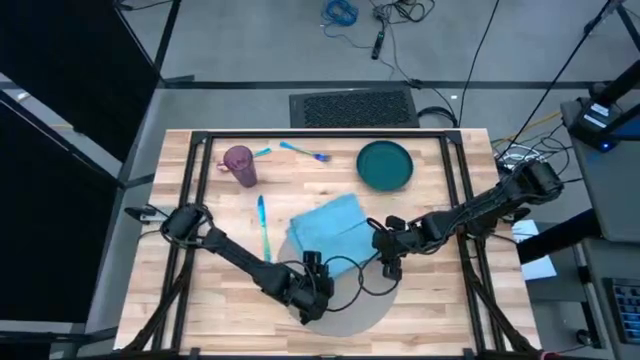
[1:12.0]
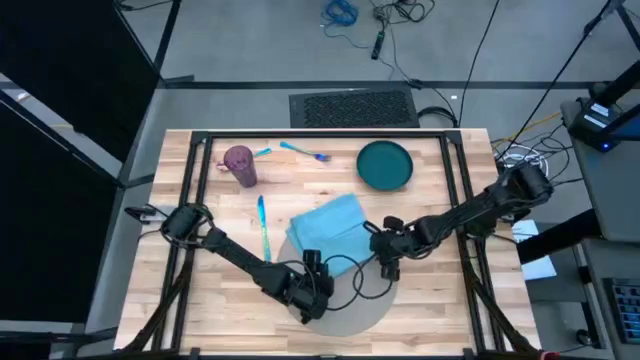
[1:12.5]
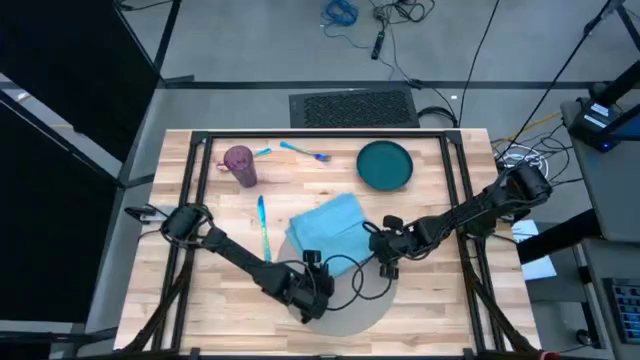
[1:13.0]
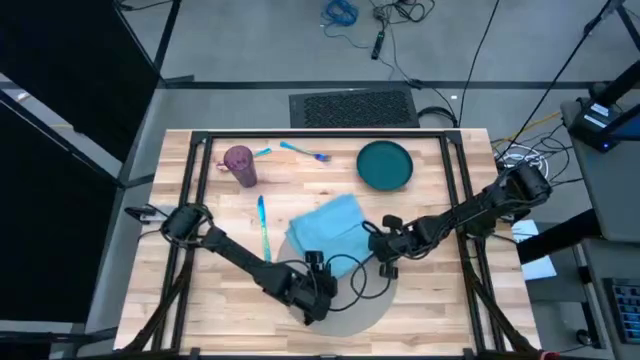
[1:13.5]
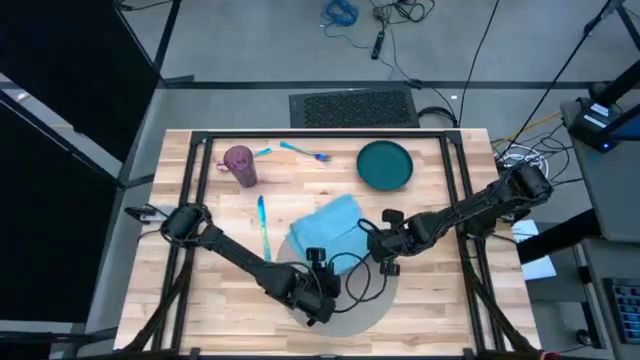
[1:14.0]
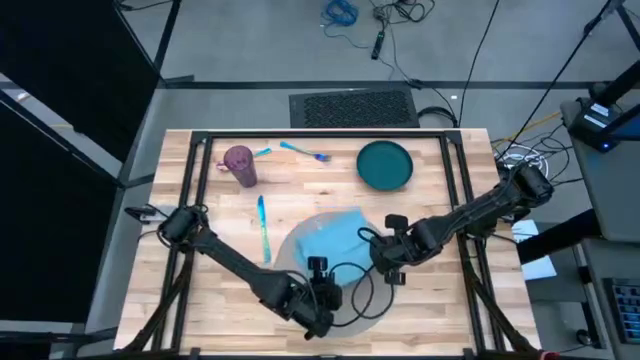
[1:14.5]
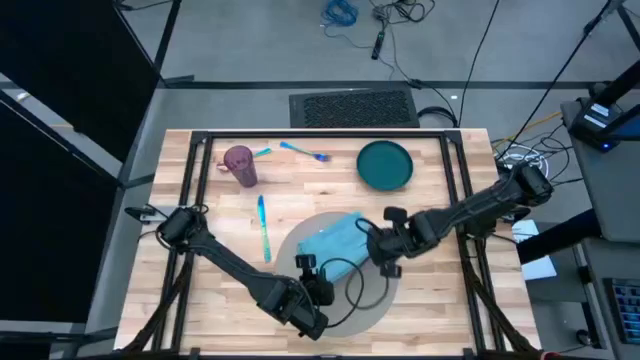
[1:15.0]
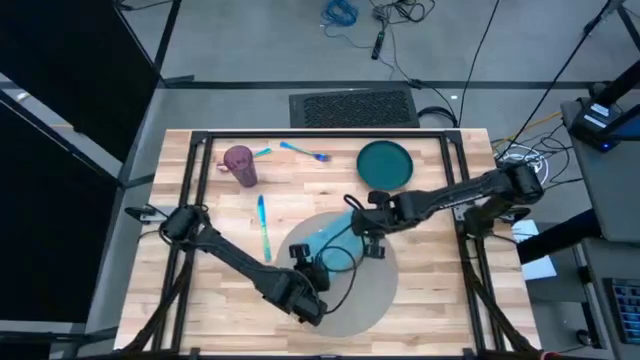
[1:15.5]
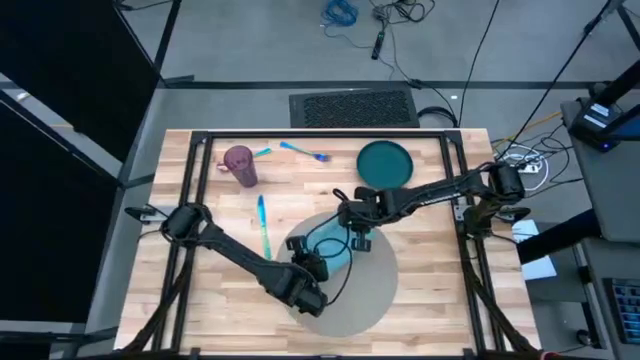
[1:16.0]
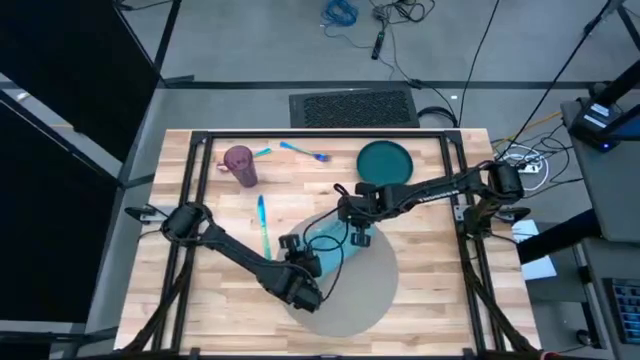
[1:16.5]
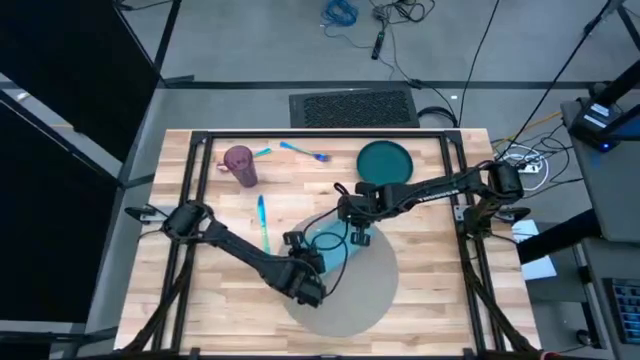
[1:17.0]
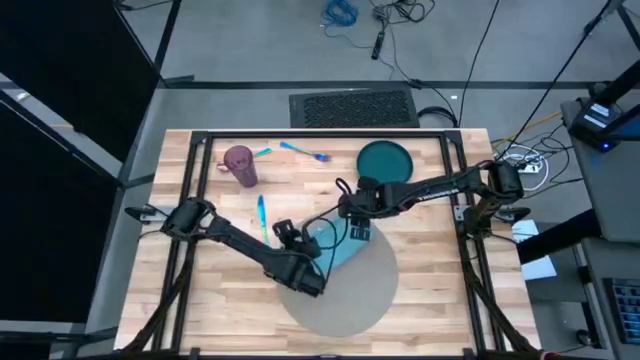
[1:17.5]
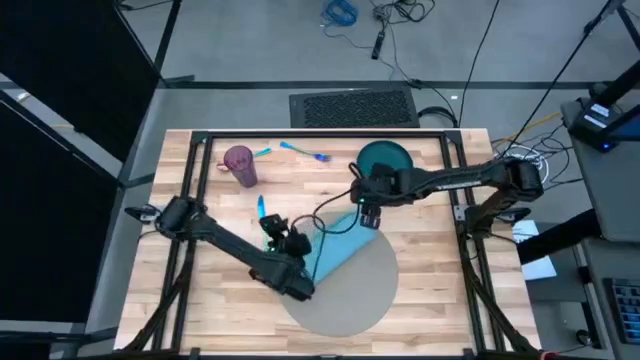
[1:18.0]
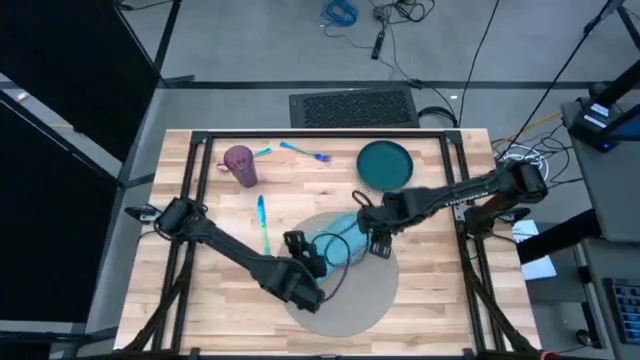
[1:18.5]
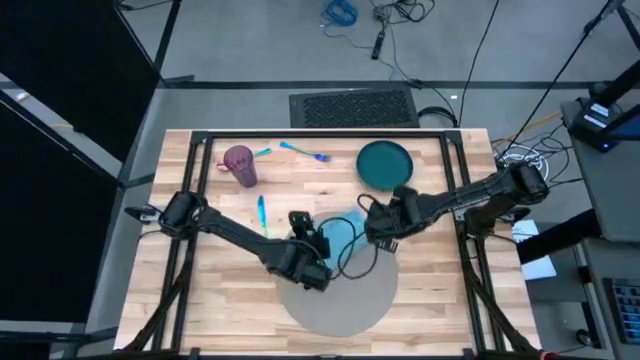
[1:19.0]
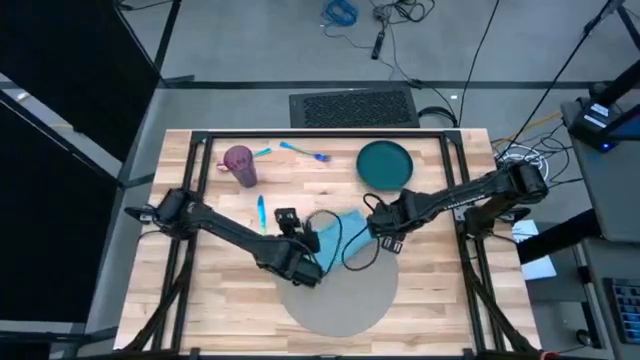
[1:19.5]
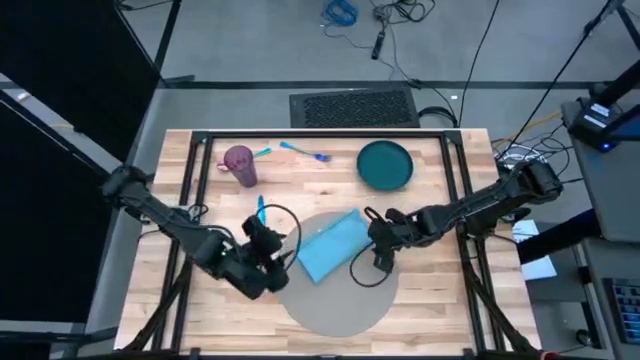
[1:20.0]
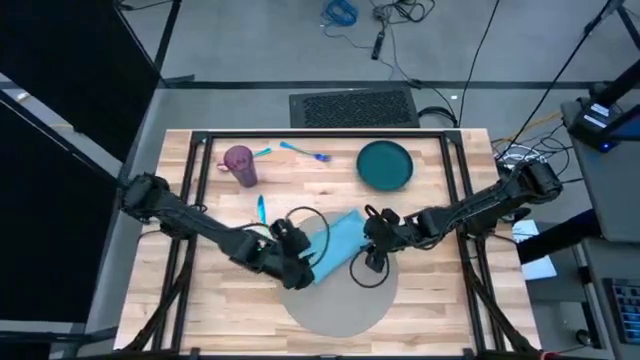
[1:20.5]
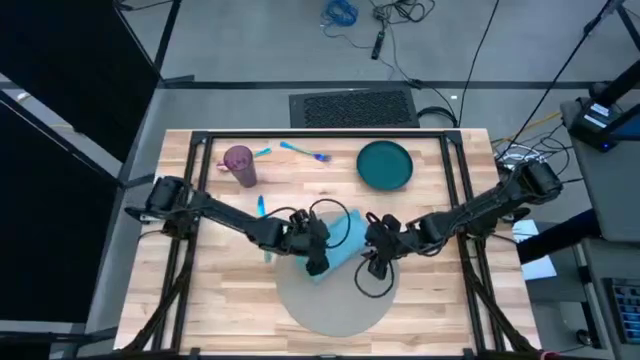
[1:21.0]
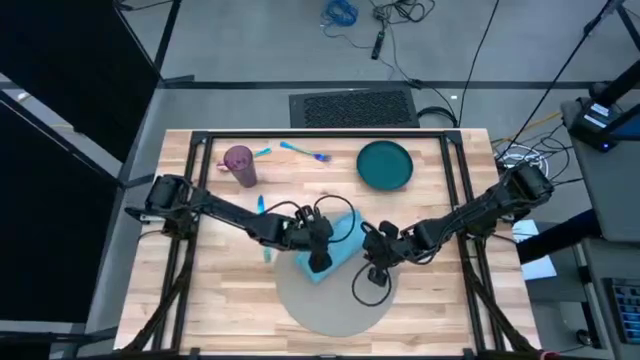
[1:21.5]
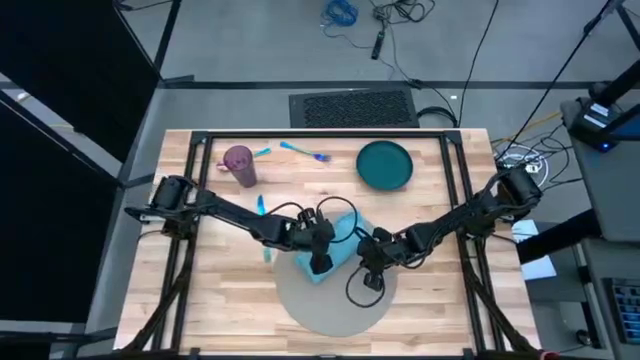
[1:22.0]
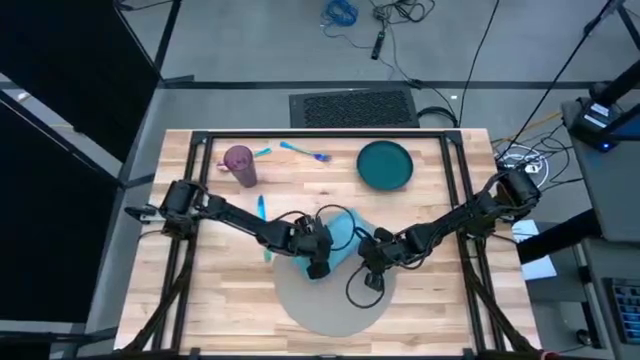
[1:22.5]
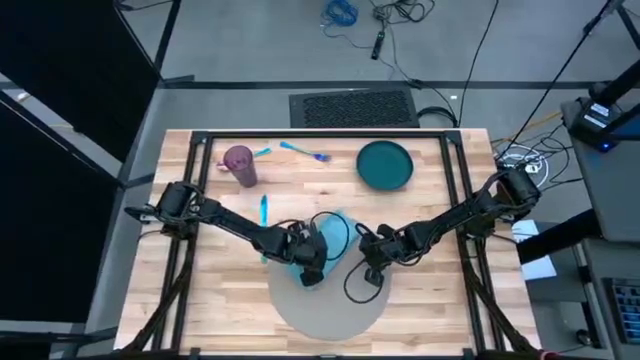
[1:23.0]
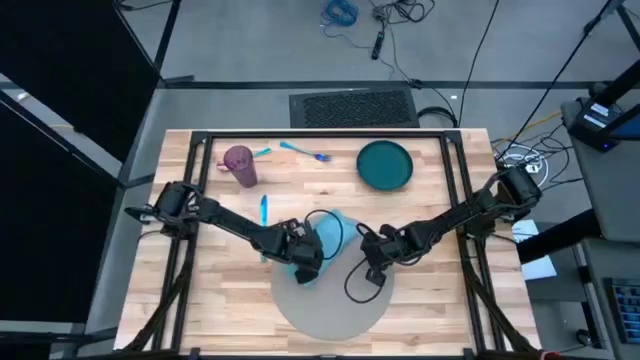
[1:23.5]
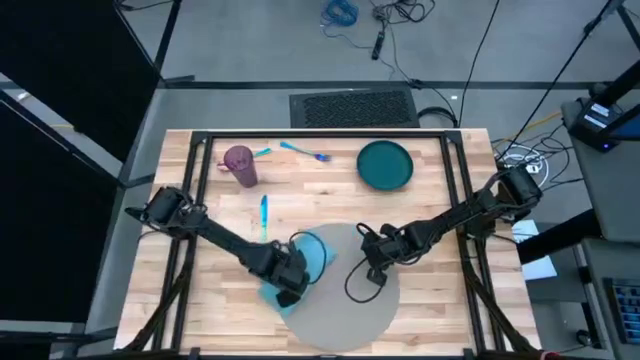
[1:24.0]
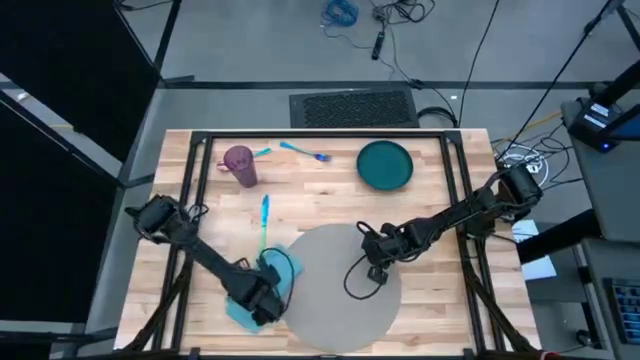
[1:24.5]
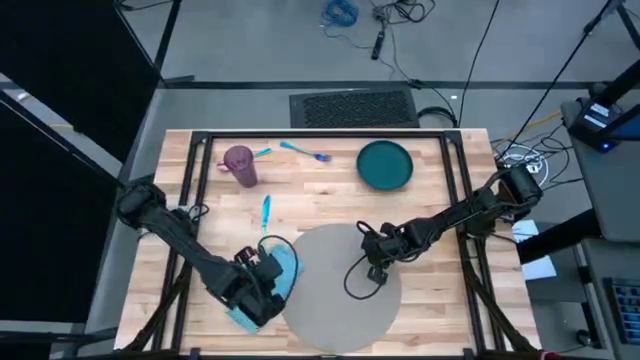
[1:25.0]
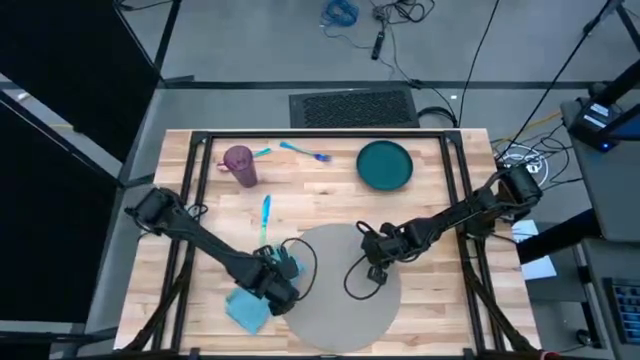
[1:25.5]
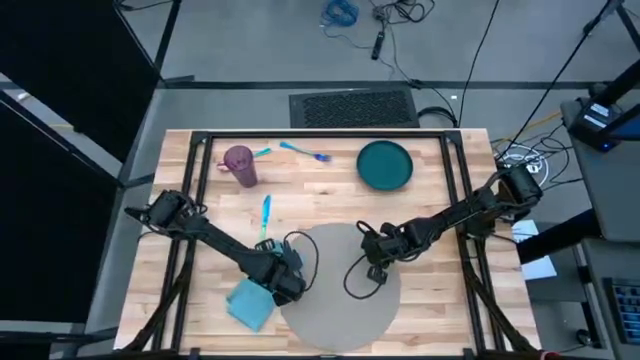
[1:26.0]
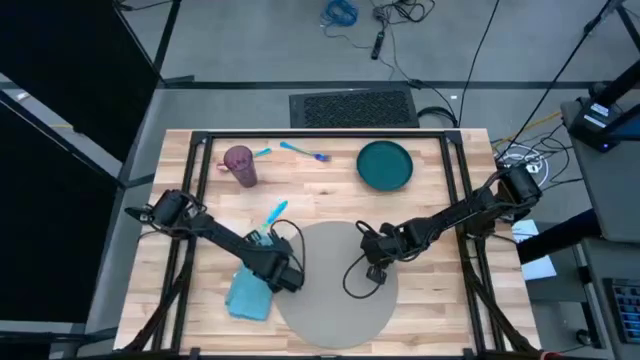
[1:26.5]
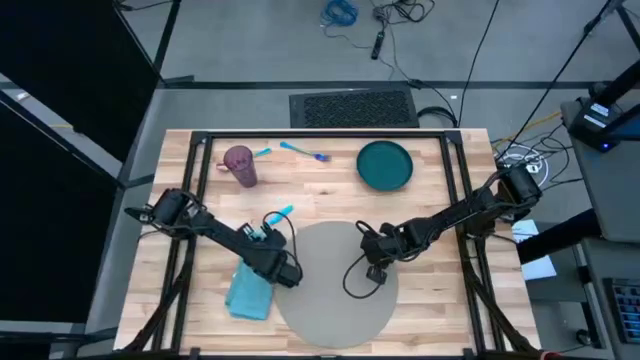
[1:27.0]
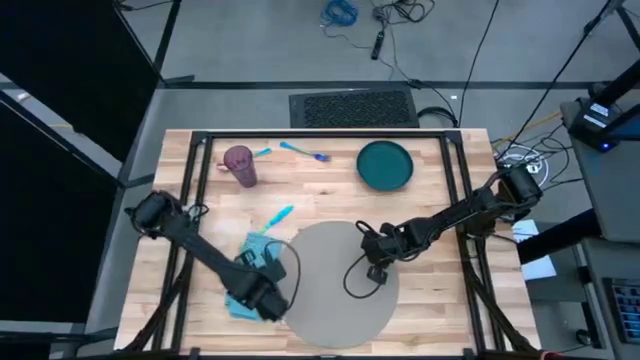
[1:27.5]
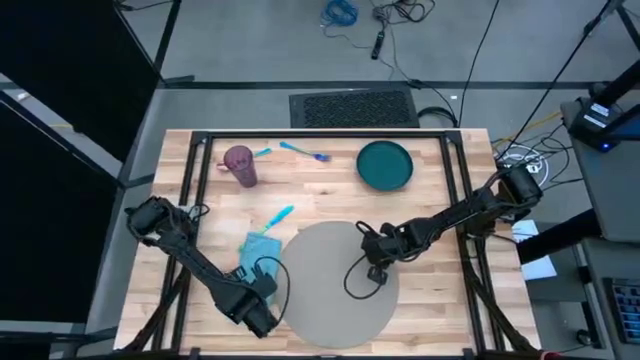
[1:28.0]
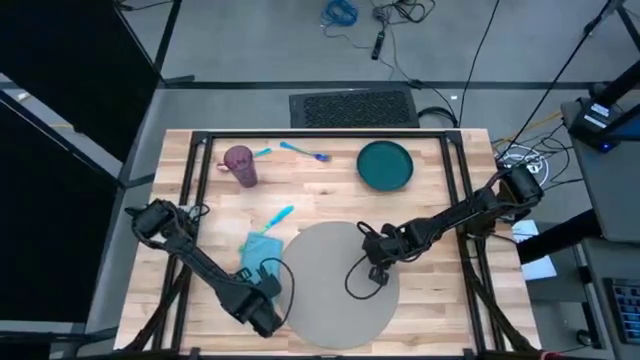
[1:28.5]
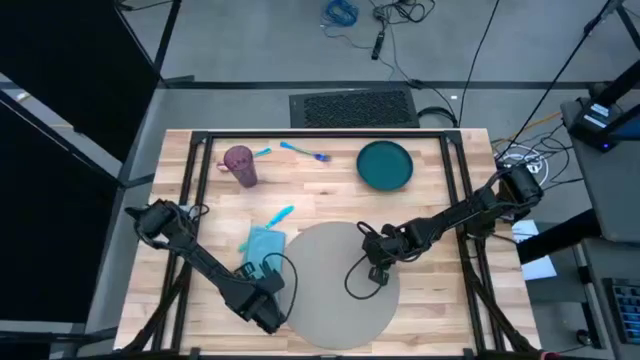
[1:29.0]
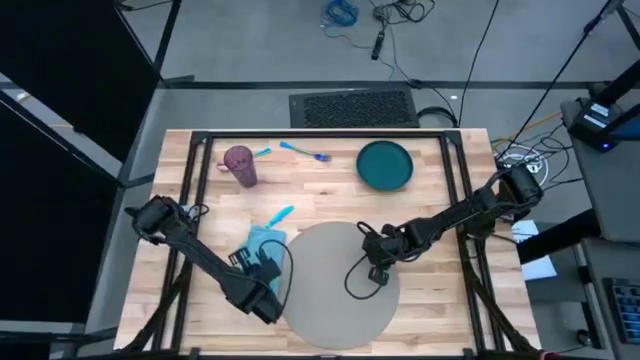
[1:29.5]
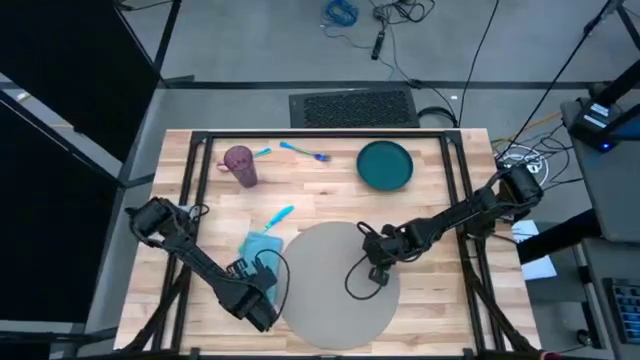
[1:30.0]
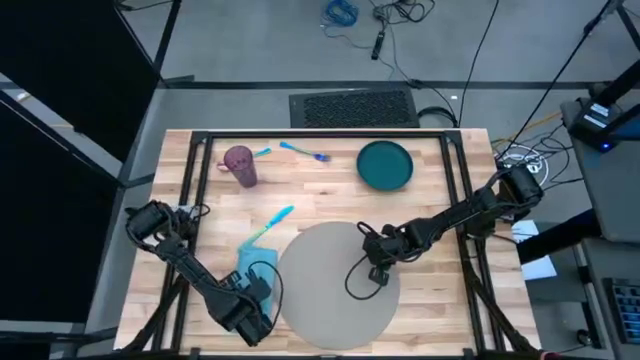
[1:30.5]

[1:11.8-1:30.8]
Task: Set table place
Fold the blue napkin

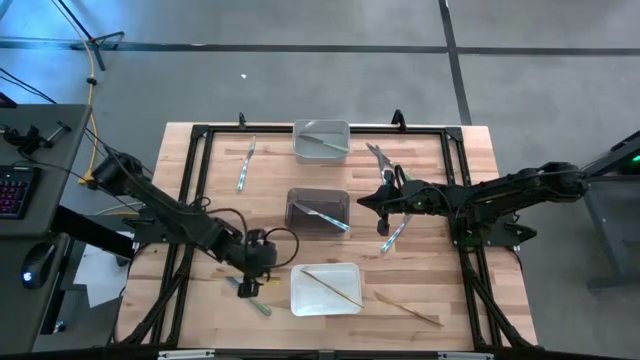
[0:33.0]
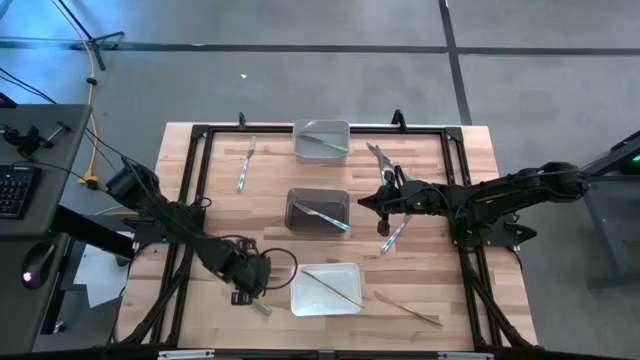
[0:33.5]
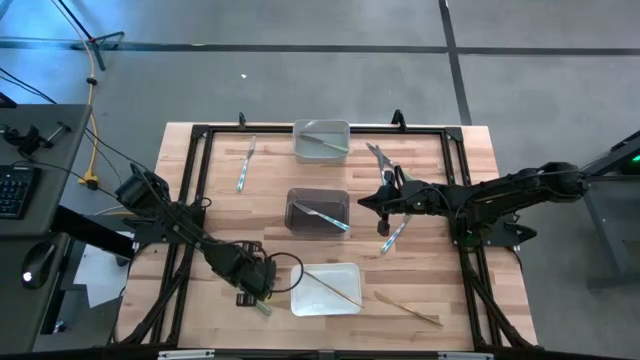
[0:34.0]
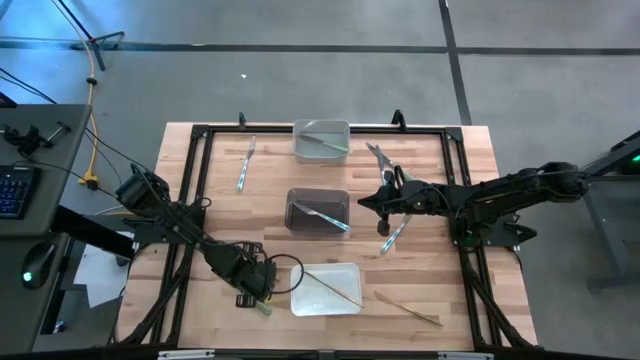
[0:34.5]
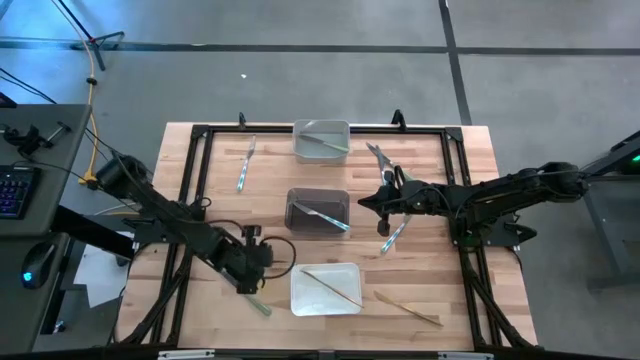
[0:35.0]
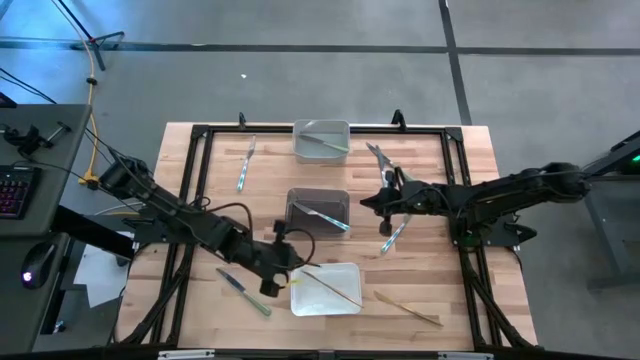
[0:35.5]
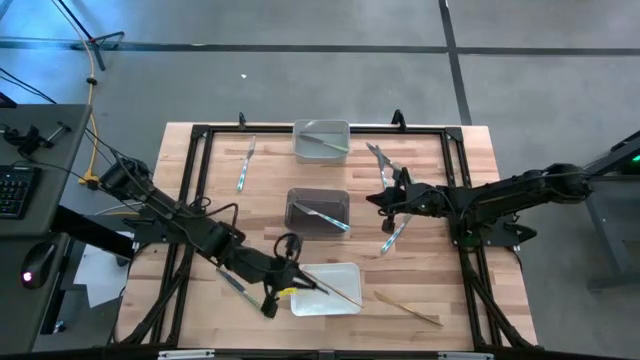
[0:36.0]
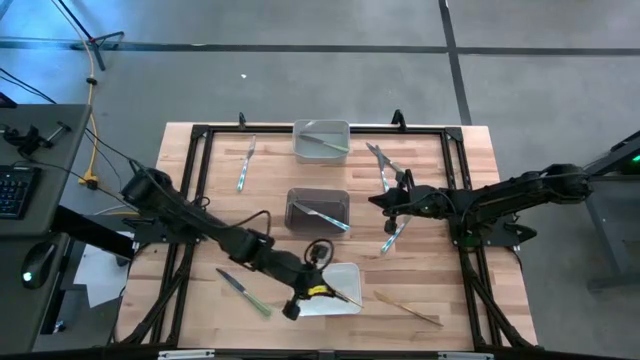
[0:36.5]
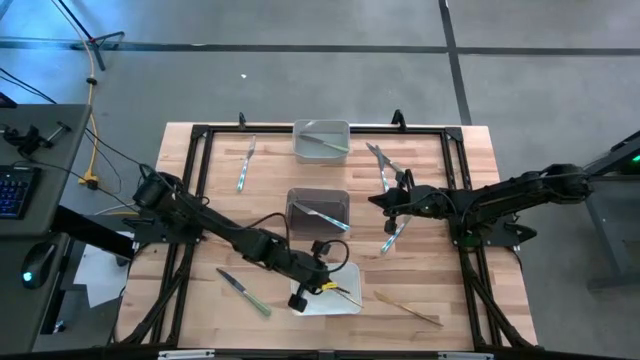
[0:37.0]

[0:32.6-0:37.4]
Task: Sort silverware by color (type)
Put the gold table knife into the white bin
